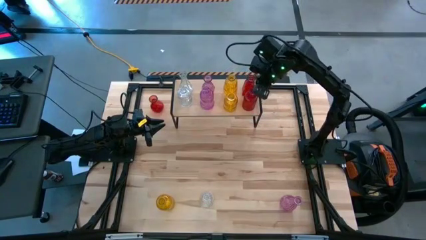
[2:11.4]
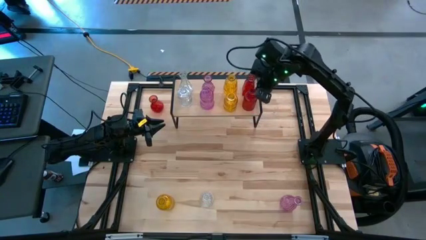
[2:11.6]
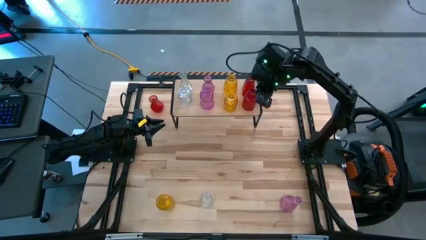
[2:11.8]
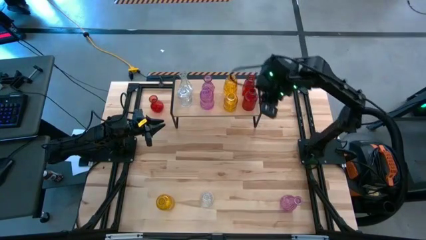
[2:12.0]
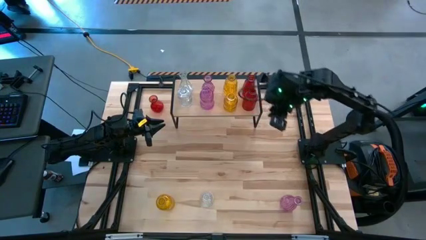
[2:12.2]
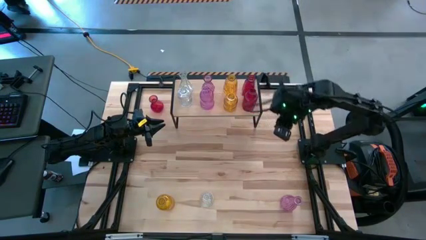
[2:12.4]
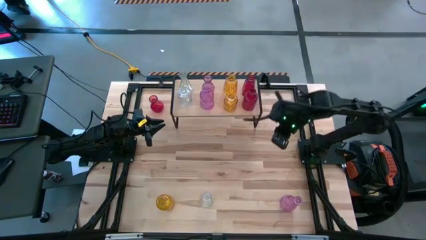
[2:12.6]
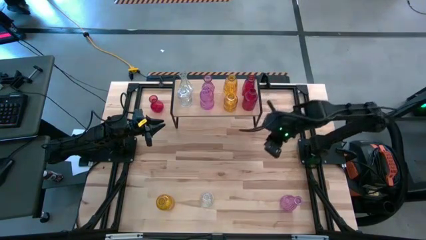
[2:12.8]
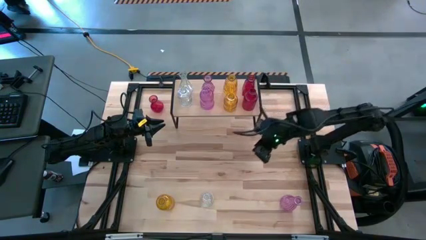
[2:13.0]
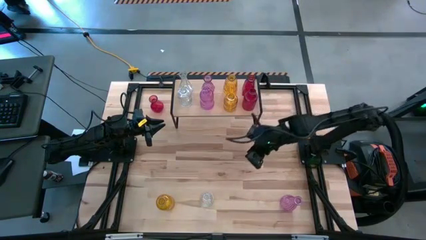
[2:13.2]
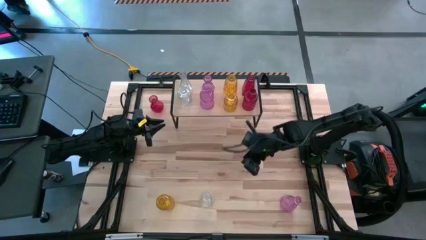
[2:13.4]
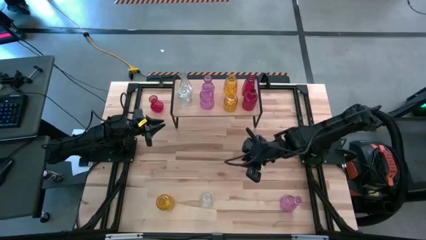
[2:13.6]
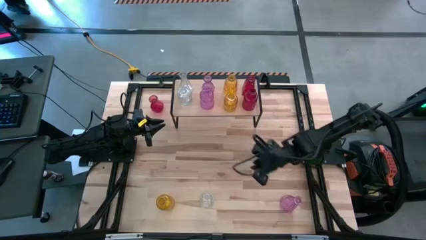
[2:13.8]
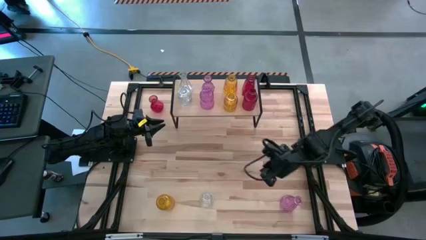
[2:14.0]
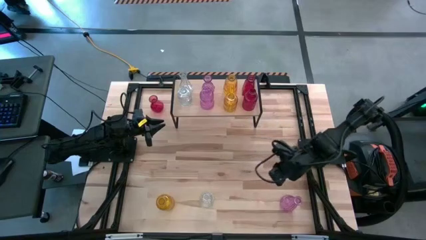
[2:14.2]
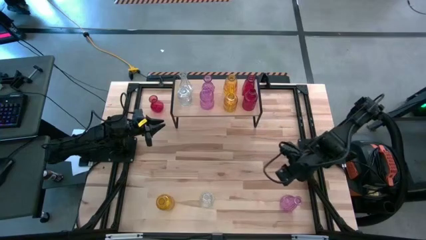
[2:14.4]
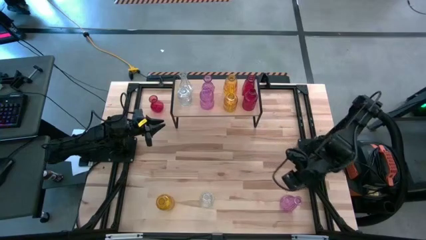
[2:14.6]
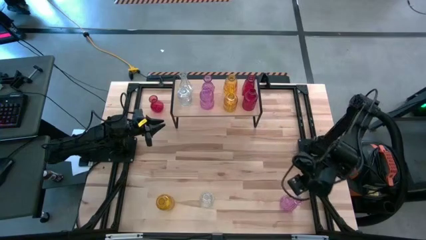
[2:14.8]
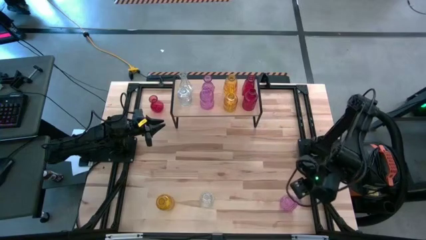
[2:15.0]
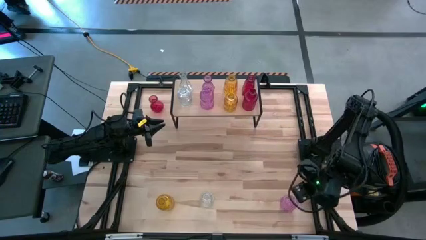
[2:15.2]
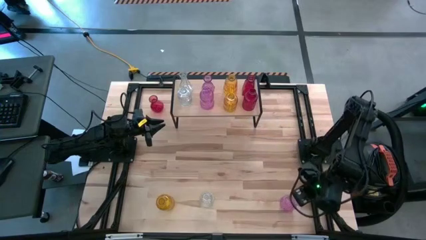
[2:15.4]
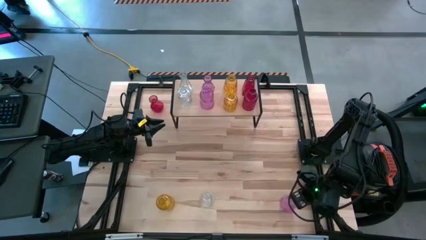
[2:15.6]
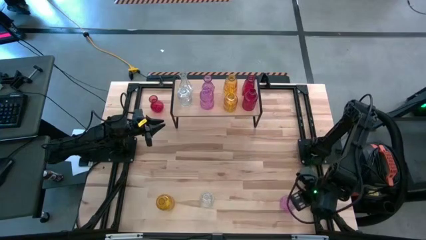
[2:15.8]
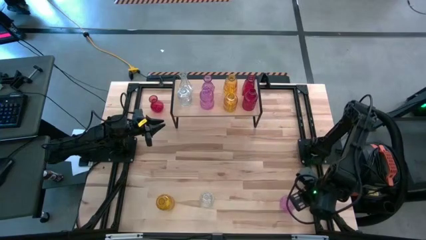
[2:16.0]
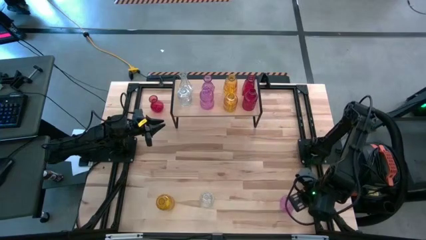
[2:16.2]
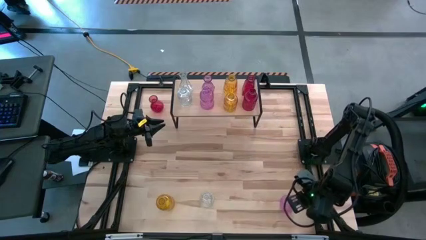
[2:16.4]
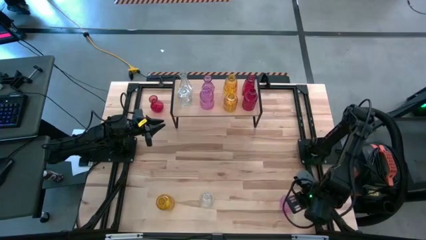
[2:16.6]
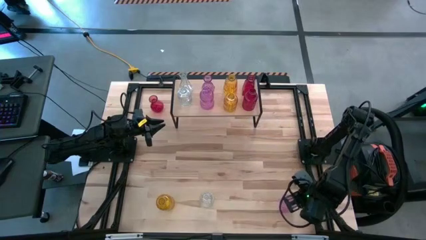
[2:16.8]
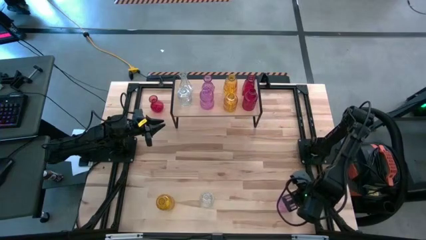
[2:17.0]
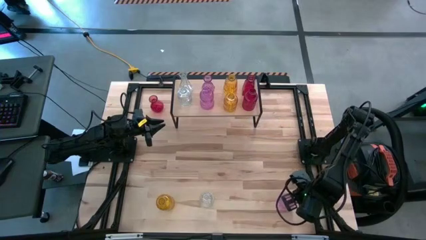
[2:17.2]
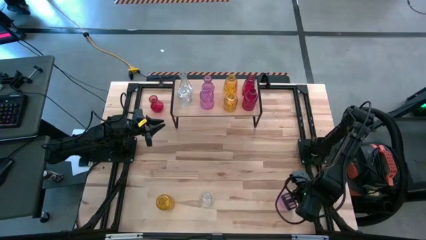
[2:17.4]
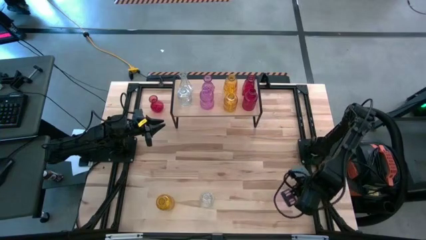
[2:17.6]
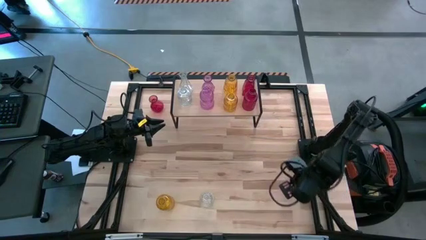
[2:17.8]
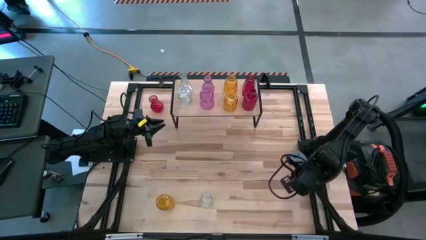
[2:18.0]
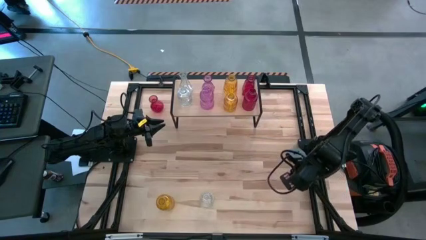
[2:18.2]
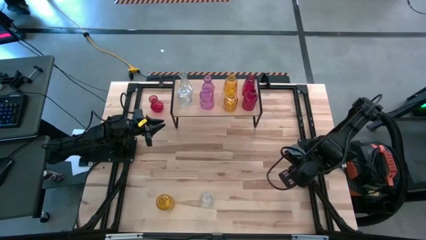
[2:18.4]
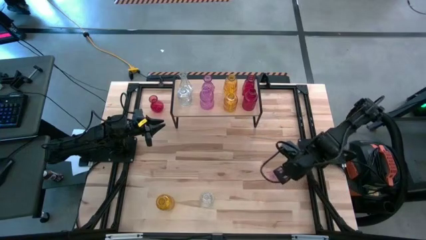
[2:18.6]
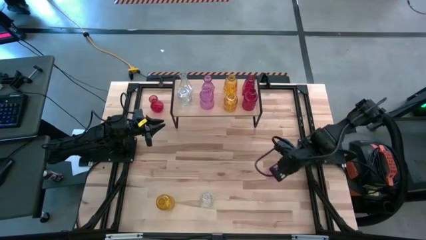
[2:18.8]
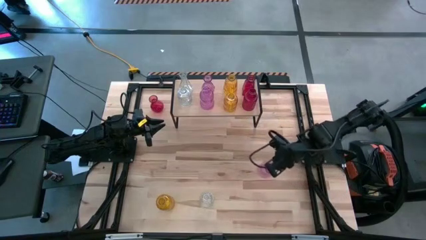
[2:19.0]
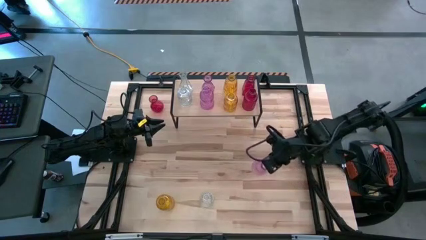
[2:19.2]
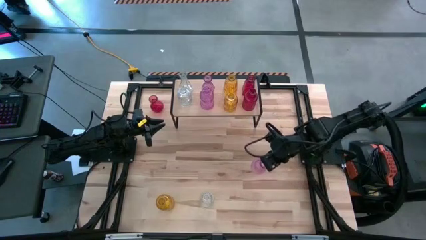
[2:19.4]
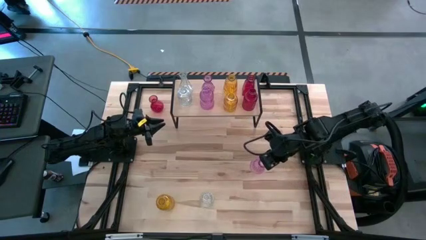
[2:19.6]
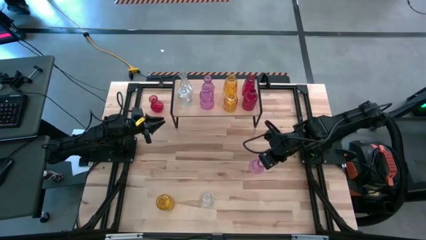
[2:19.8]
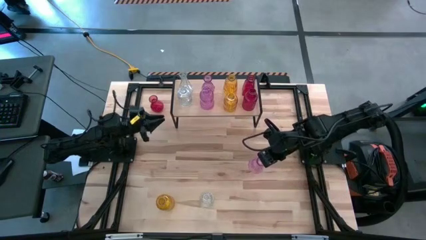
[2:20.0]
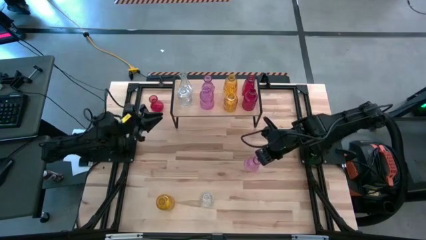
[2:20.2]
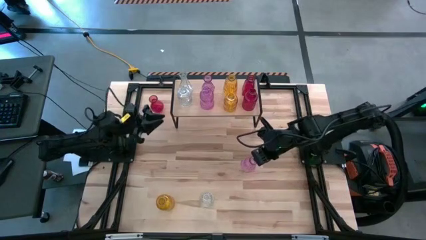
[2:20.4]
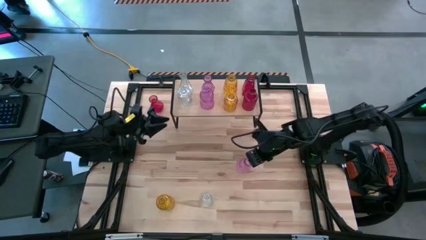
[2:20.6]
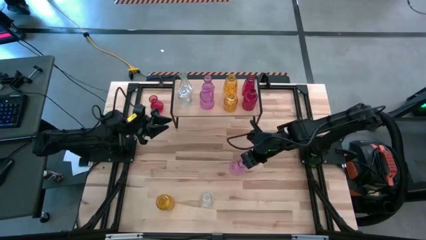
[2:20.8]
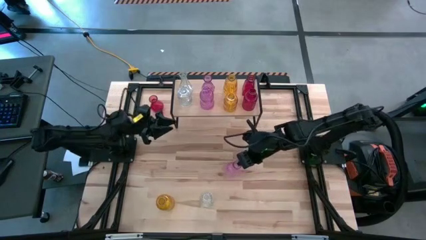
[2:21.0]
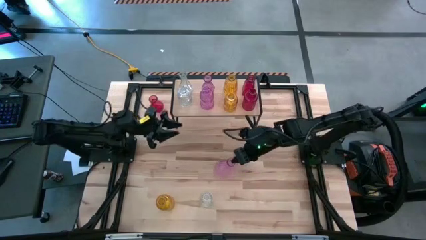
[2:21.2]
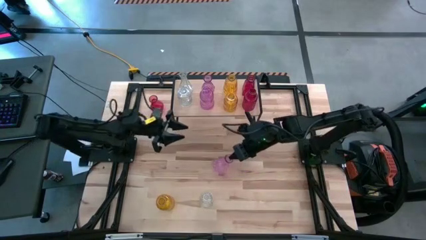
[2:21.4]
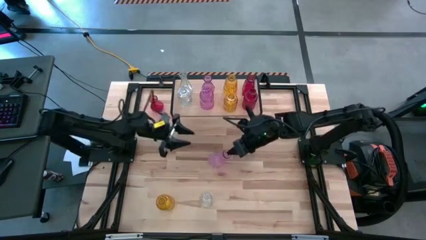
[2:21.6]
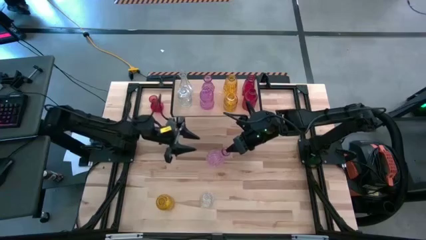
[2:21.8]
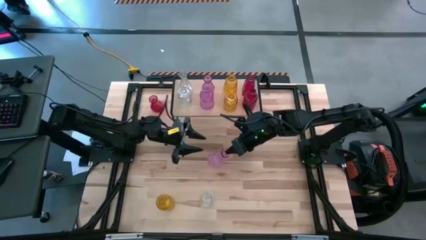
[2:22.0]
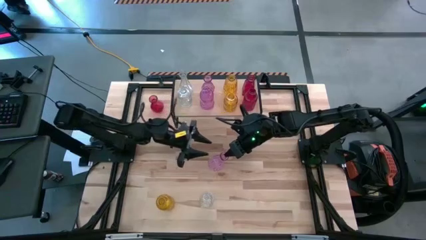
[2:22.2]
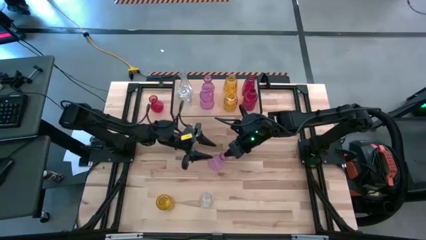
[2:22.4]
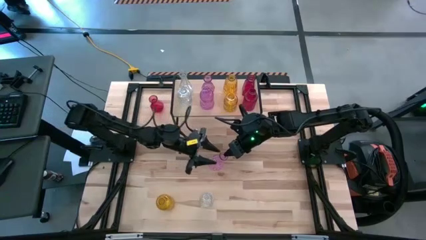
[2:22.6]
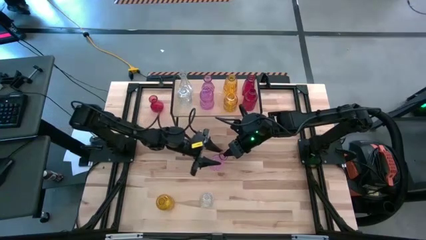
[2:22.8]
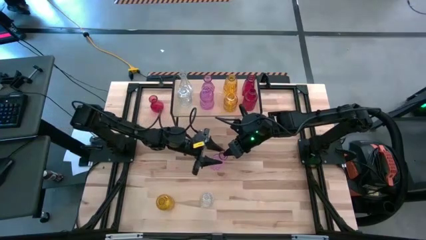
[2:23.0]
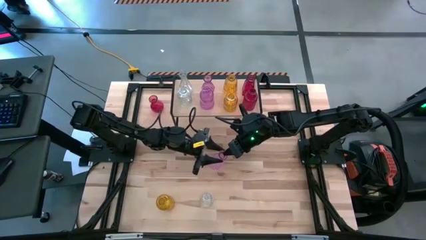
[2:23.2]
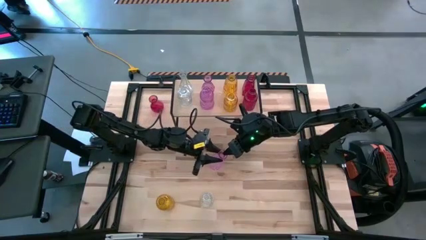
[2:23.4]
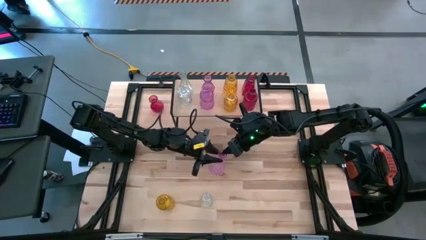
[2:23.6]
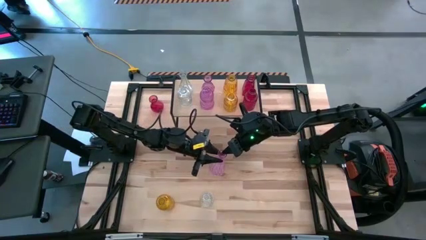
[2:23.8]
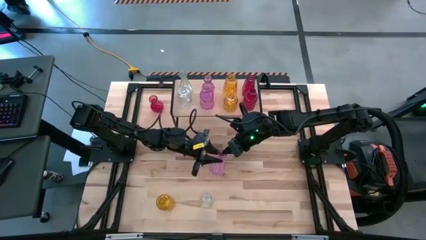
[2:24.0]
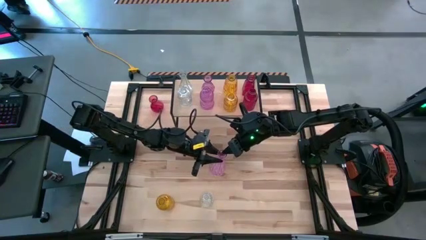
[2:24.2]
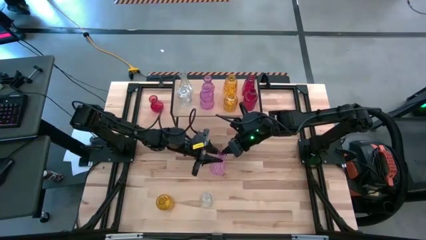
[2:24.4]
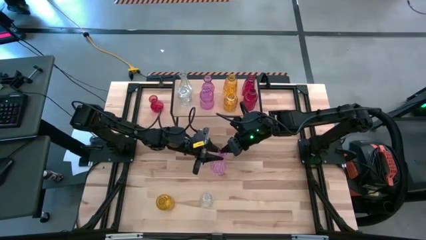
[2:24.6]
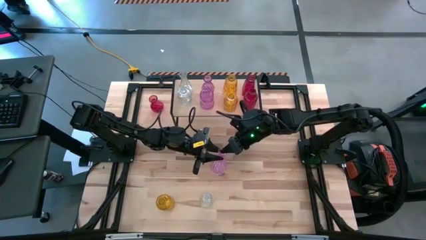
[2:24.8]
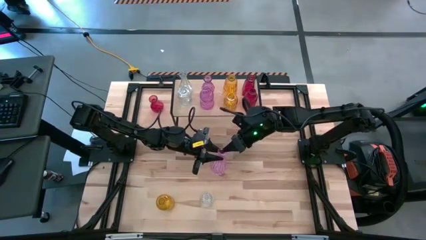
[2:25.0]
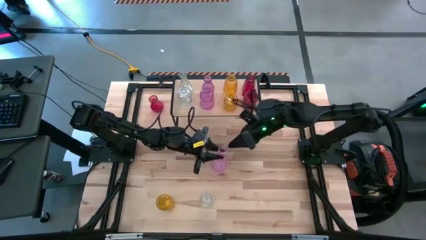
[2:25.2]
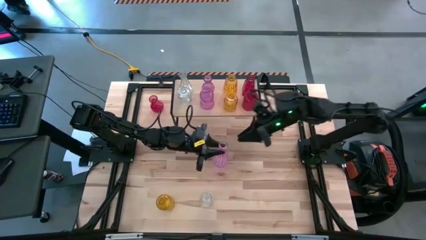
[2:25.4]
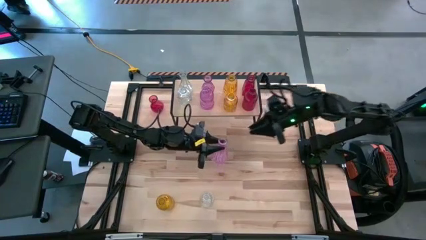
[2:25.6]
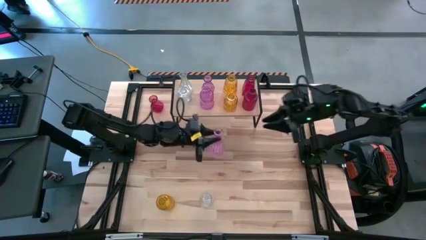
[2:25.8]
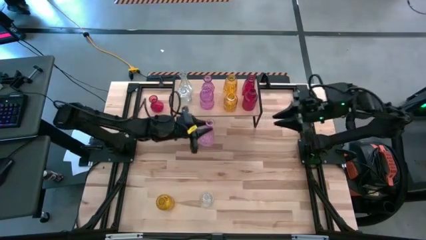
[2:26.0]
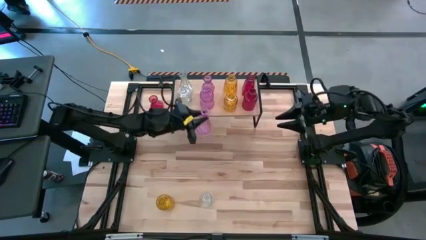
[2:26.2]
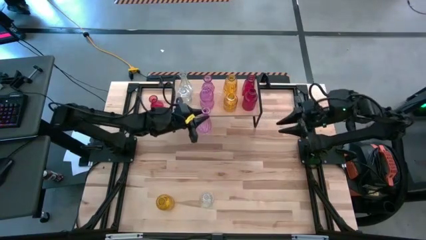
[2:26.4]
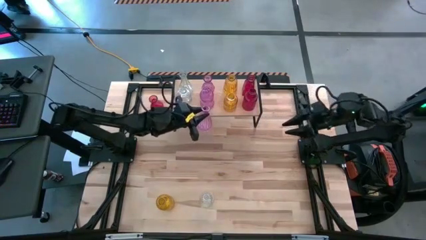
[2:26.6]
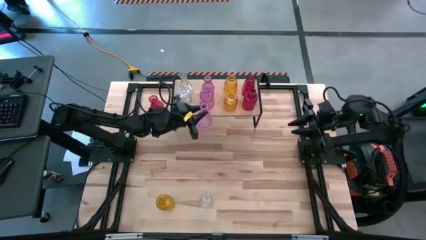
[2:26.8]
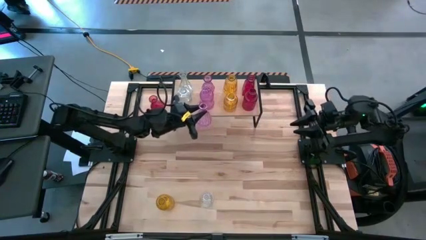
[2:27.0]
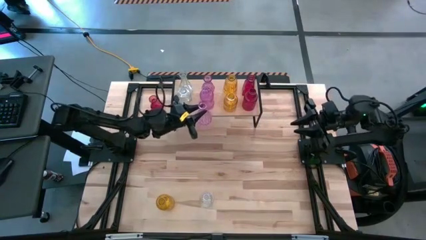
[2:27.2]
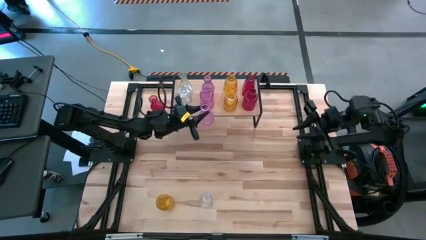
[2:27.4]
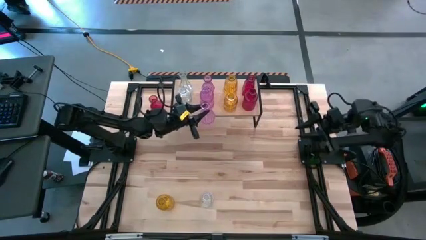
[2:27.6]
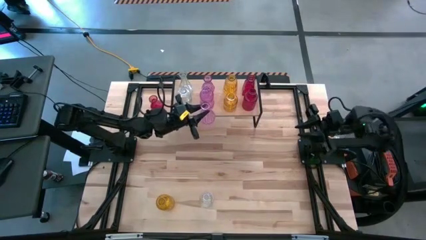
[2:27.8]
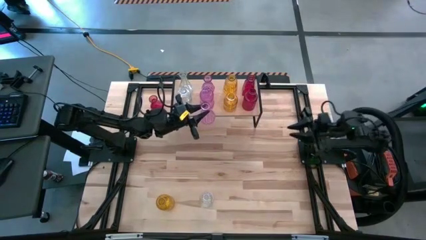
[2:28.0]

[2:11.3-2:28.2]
Task: sort vases onto shelf
Put the purple vase on the shelf aligned with the other purple vase
